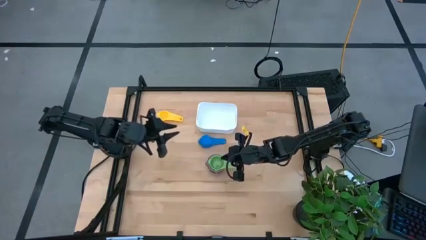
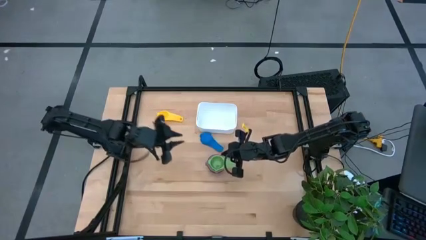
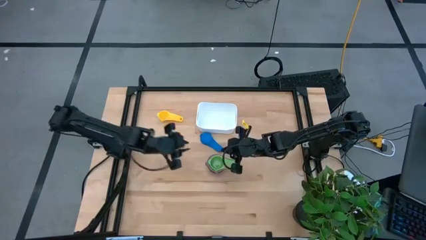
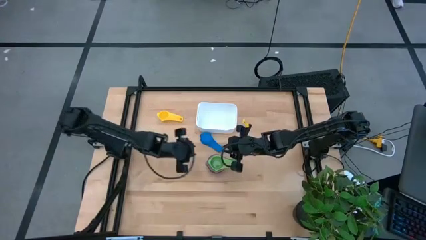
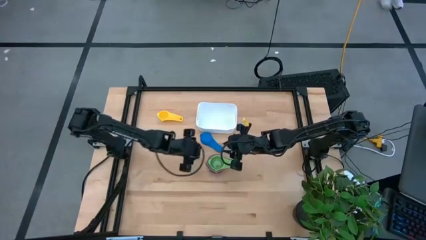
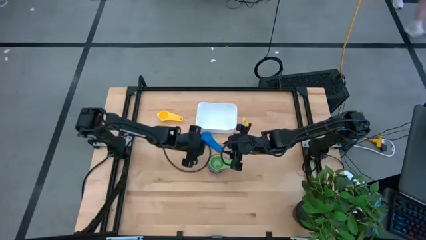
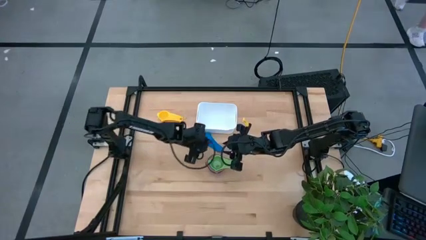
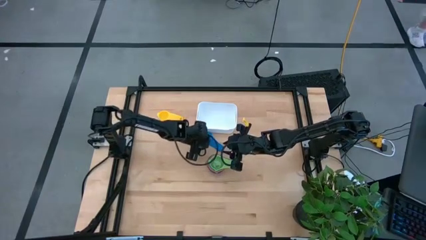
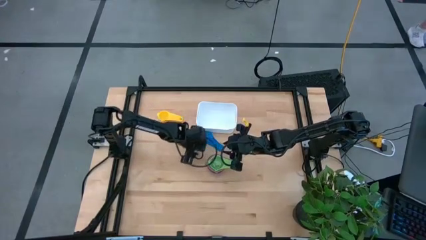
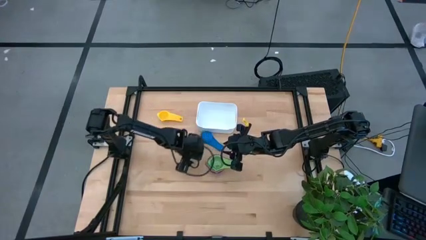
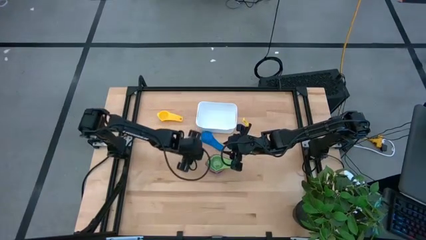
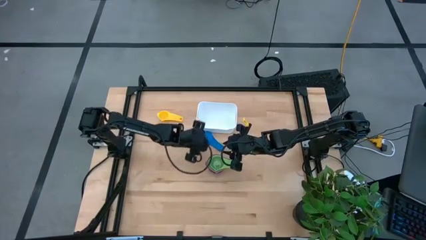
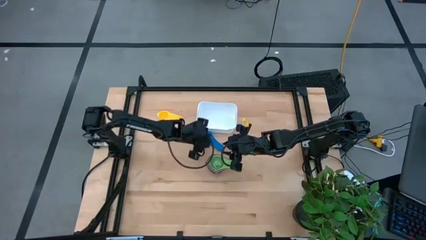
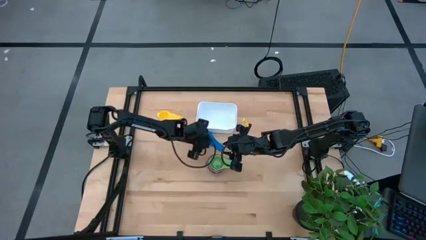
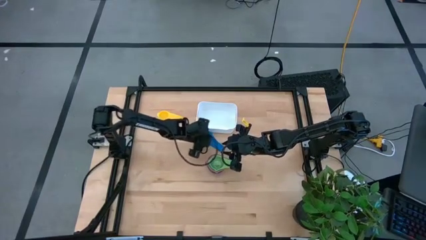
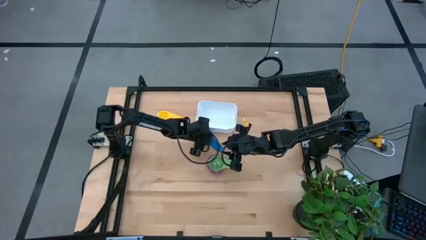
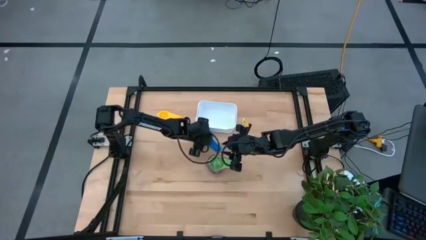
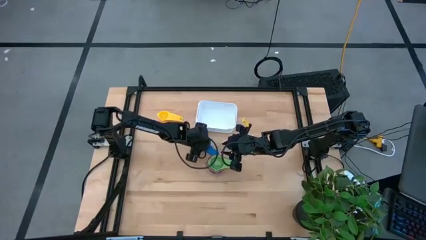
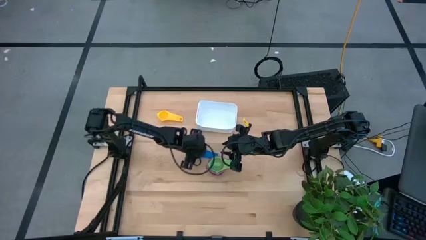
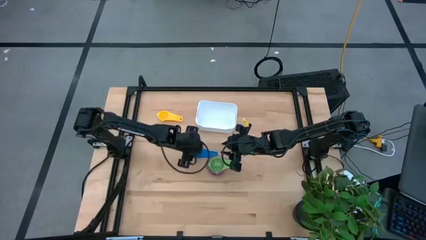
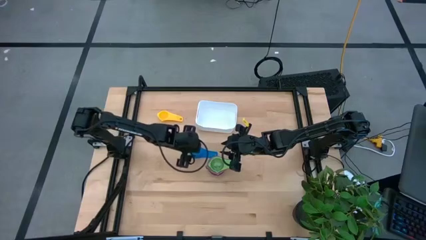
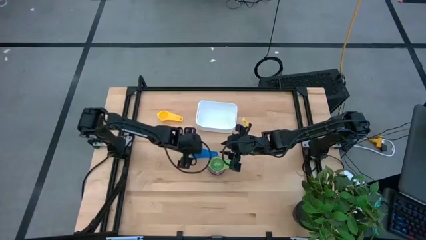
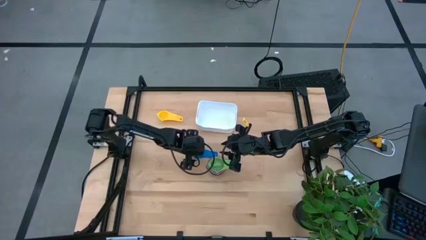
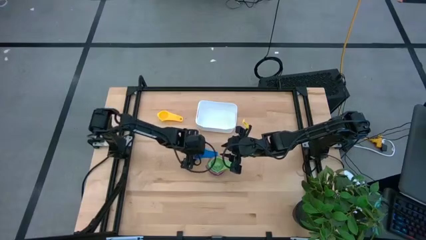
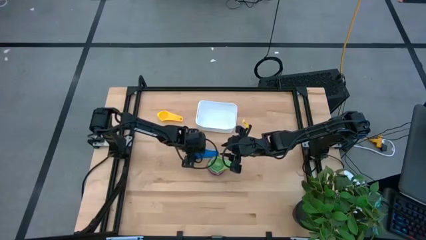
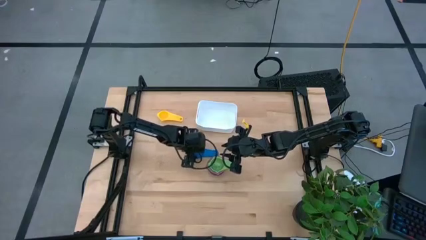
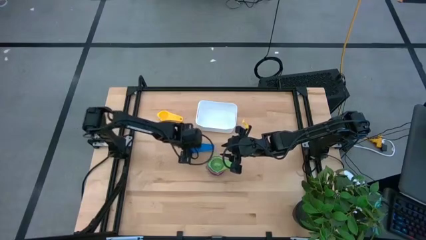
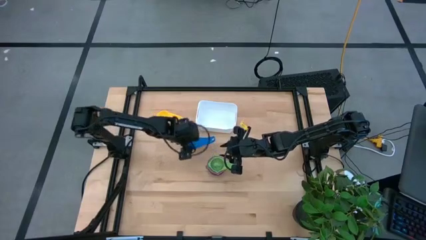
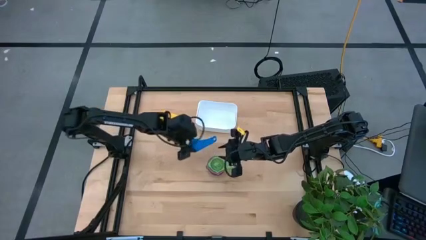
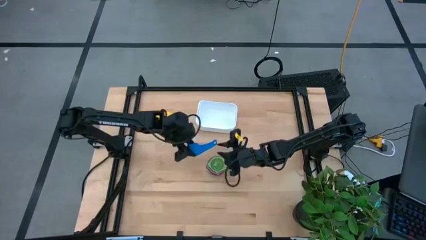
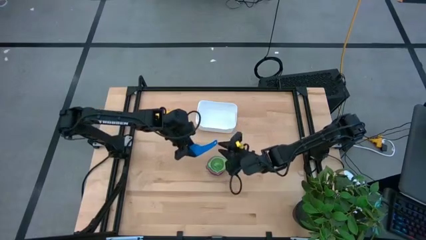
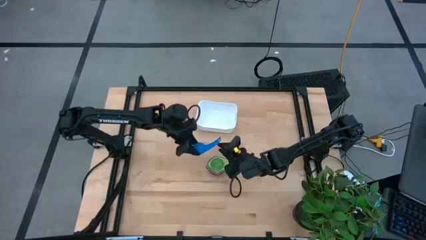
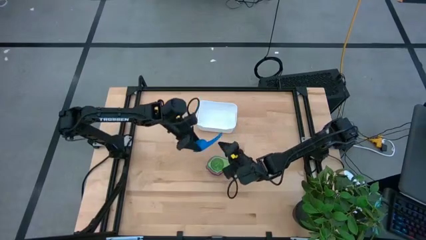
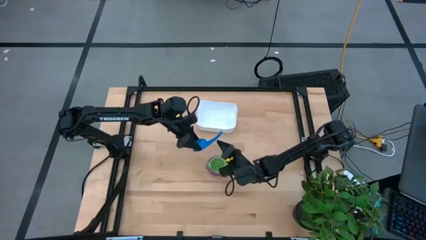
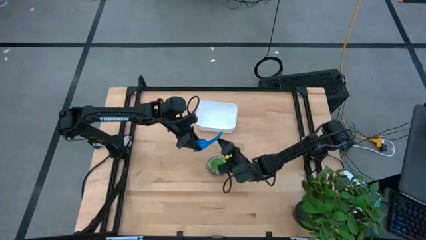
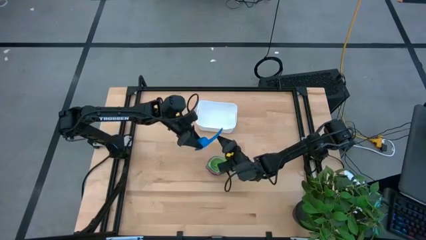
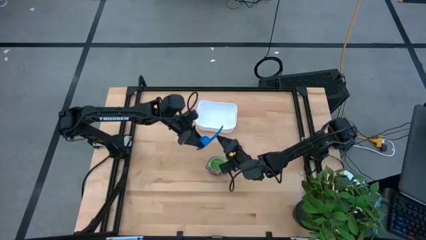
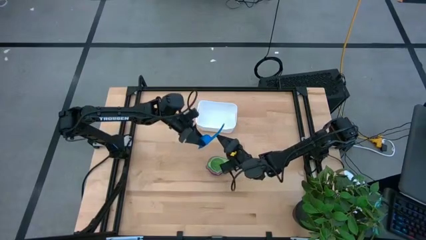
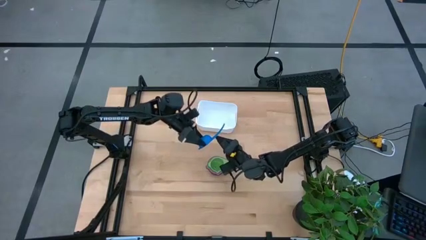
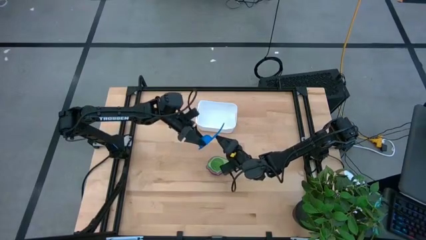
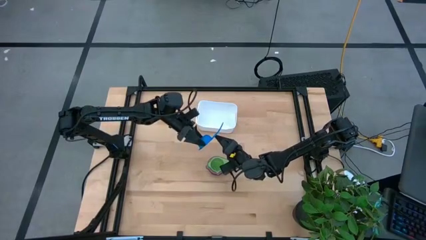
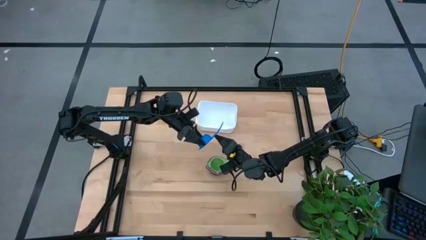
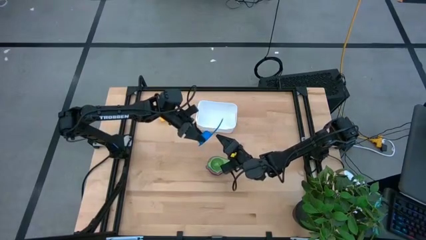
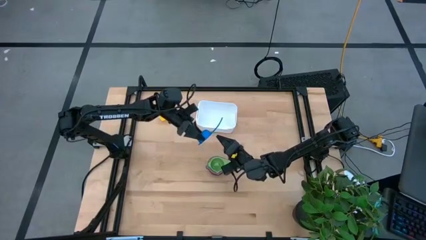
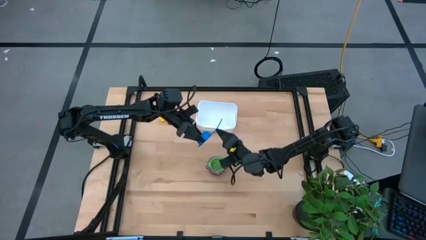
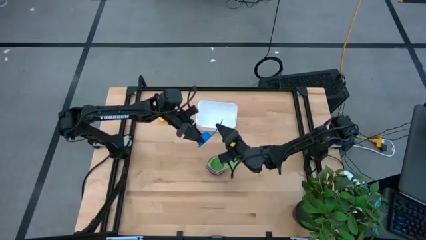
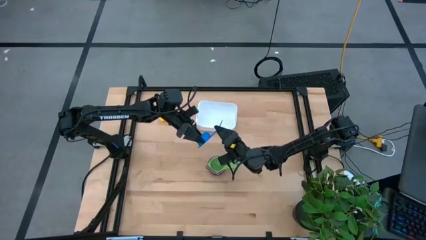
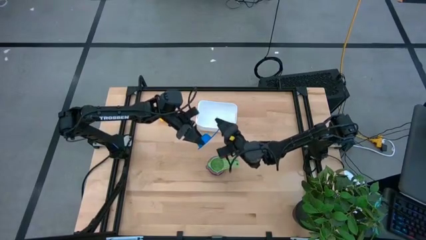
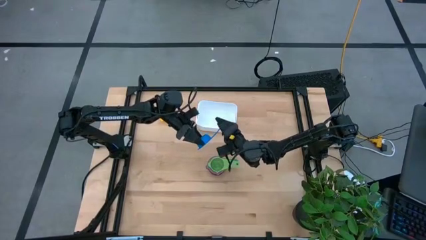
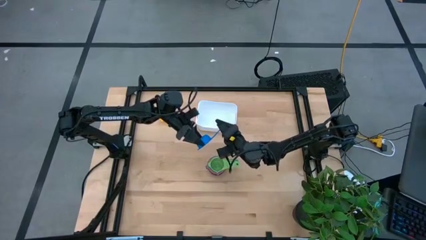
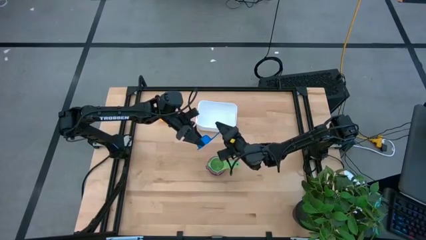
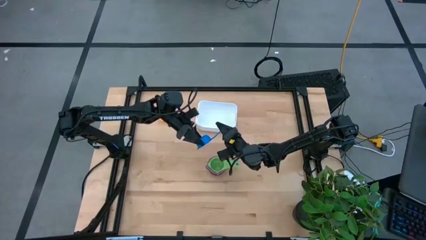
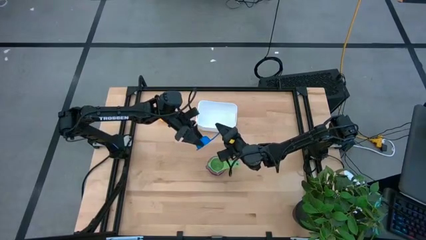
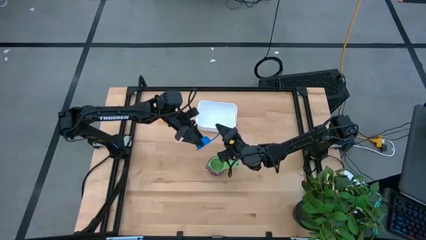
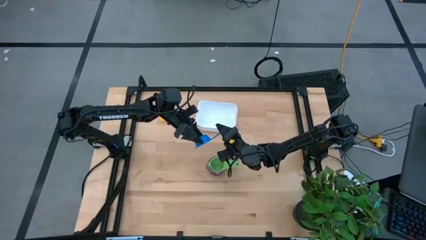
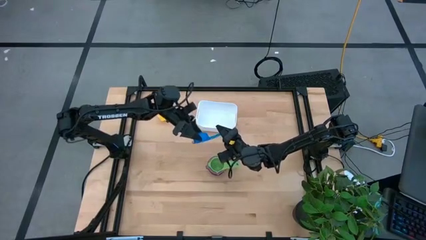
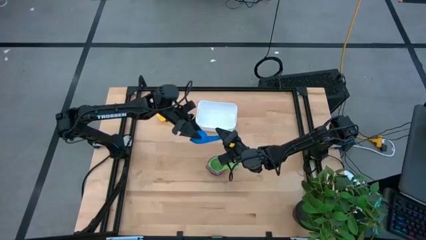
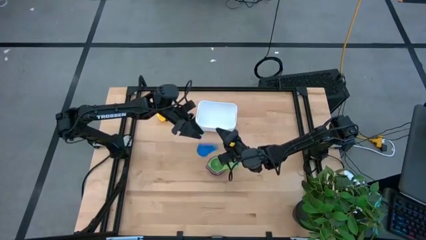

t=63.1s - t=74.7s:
Task: Nest measuring cups in basket
Stack the dark blue measuring cup on top of the green measuring cup
